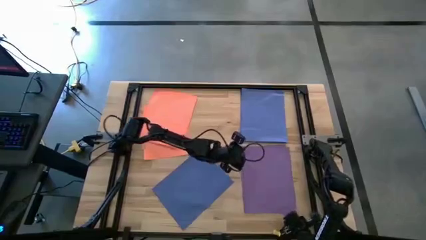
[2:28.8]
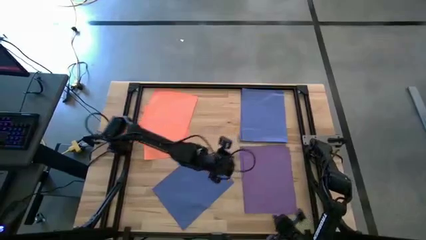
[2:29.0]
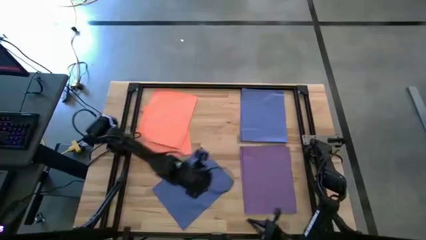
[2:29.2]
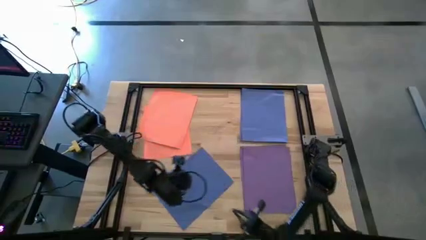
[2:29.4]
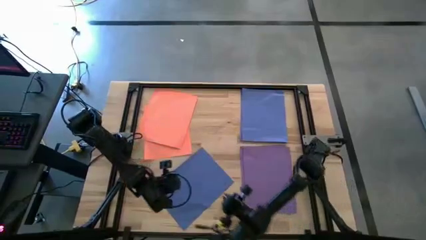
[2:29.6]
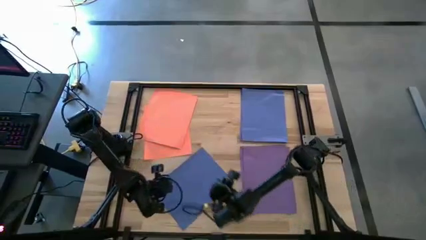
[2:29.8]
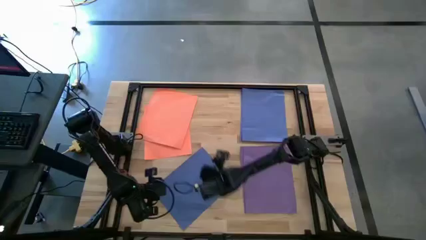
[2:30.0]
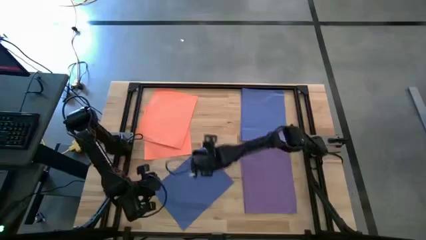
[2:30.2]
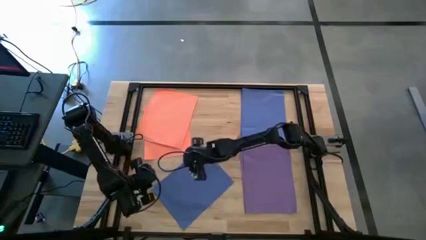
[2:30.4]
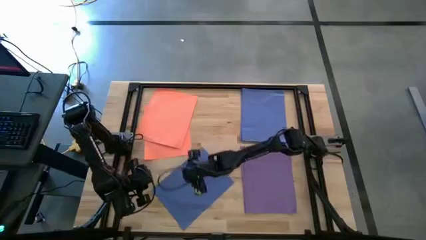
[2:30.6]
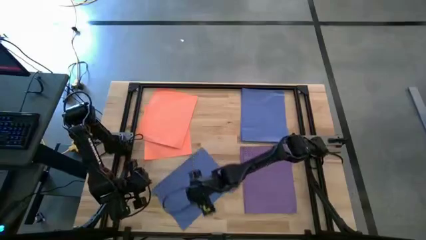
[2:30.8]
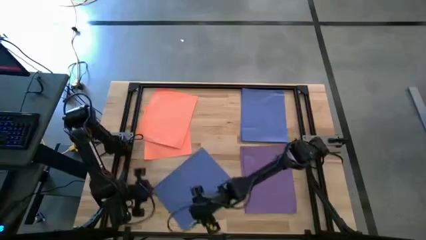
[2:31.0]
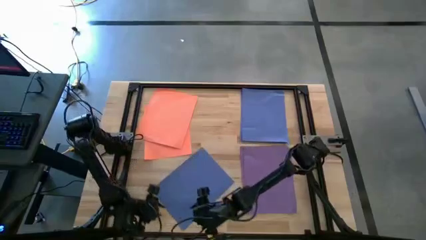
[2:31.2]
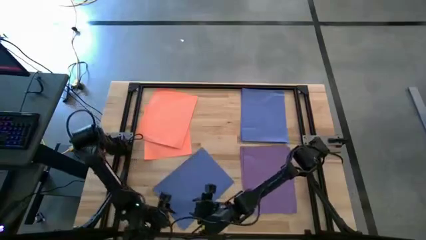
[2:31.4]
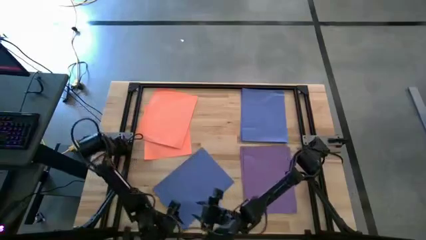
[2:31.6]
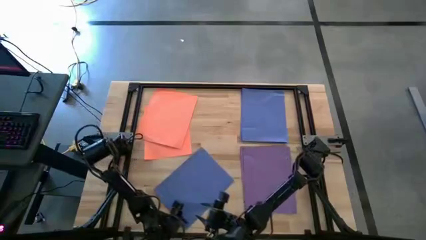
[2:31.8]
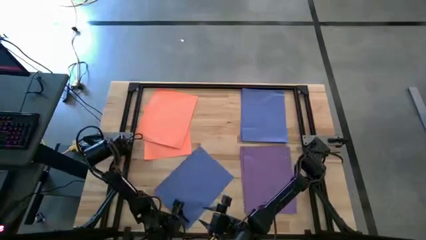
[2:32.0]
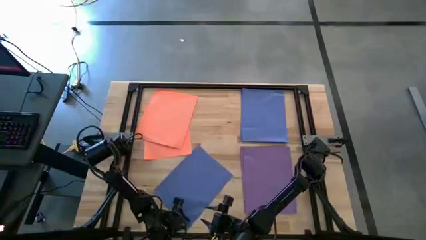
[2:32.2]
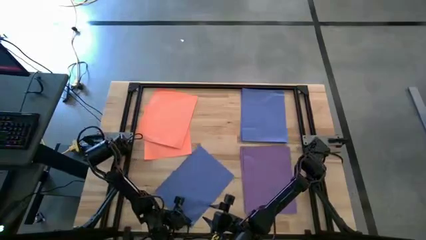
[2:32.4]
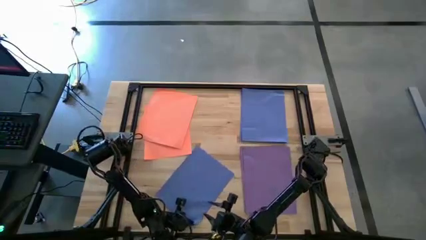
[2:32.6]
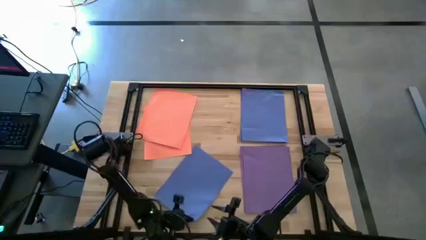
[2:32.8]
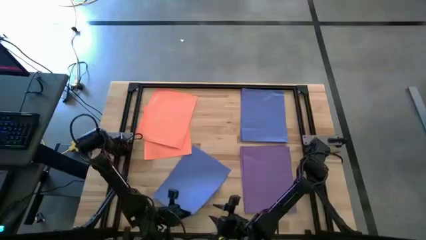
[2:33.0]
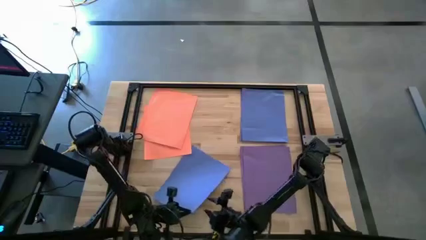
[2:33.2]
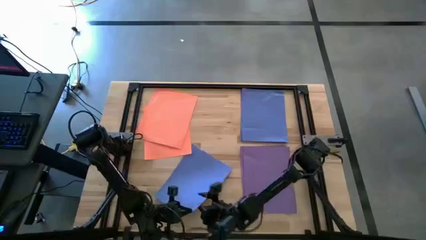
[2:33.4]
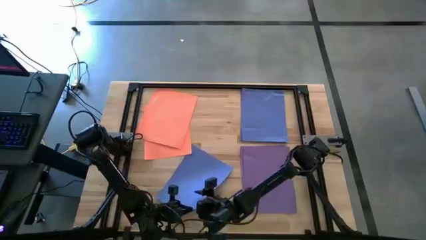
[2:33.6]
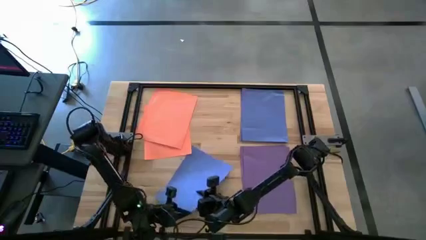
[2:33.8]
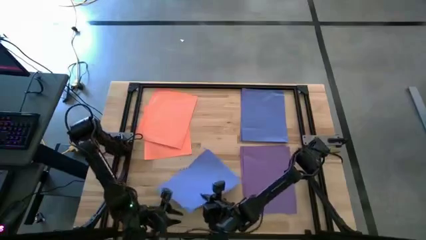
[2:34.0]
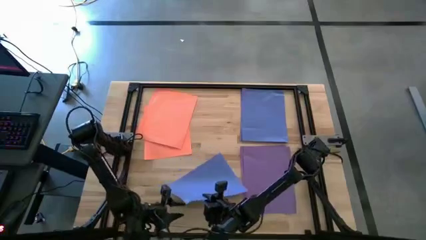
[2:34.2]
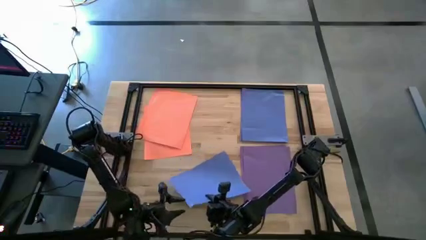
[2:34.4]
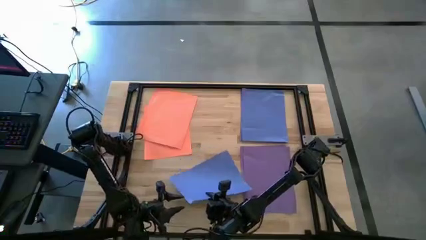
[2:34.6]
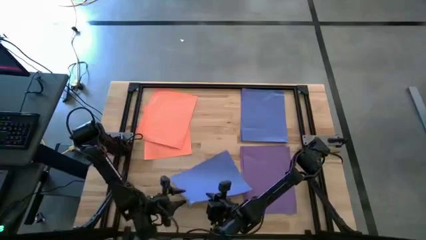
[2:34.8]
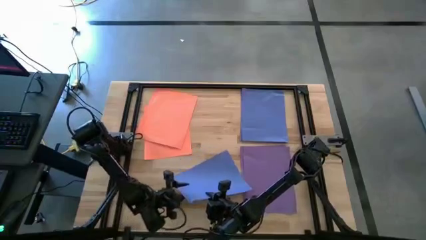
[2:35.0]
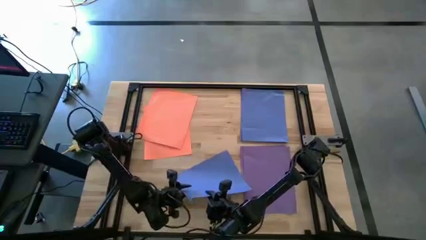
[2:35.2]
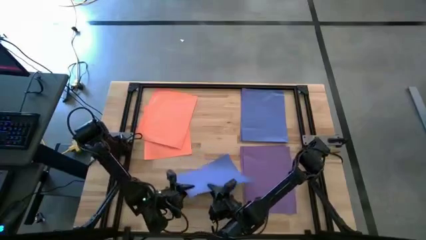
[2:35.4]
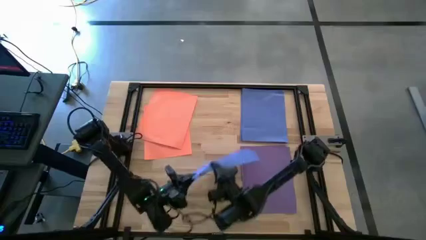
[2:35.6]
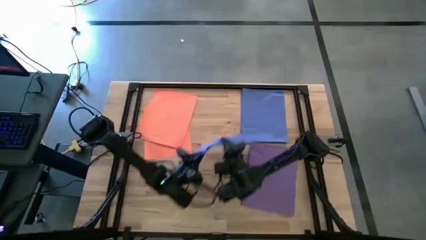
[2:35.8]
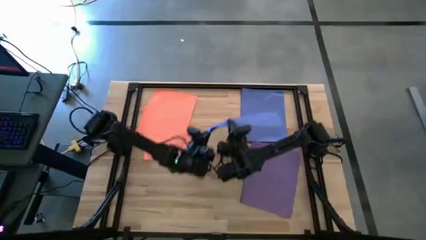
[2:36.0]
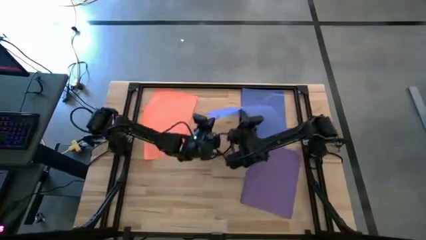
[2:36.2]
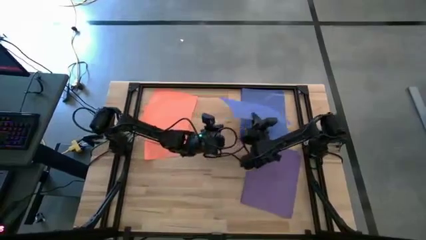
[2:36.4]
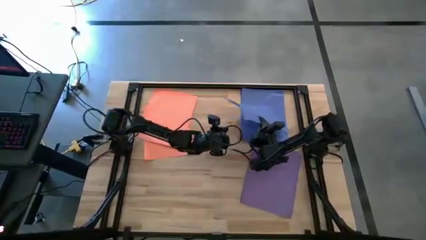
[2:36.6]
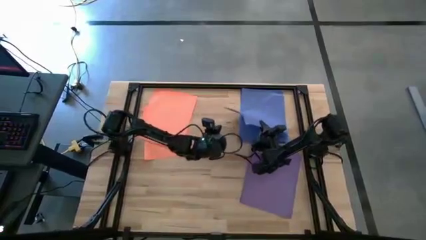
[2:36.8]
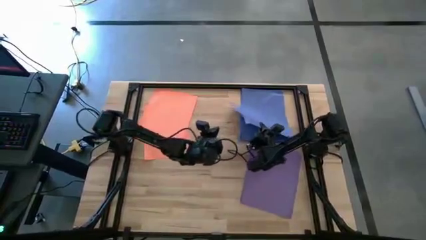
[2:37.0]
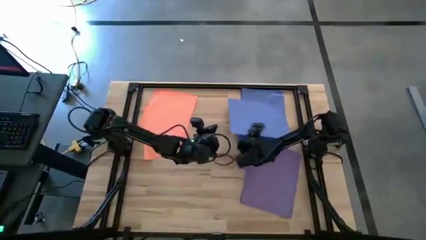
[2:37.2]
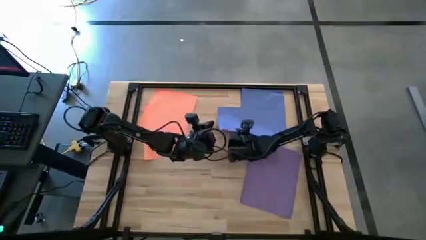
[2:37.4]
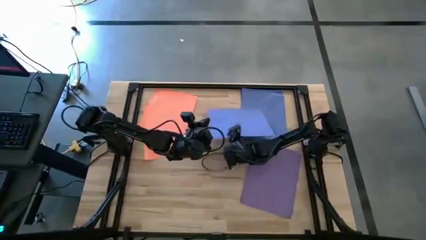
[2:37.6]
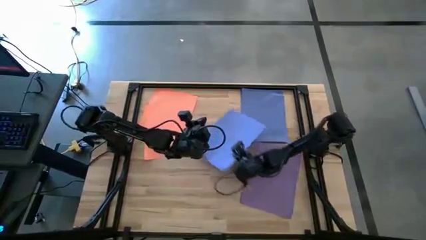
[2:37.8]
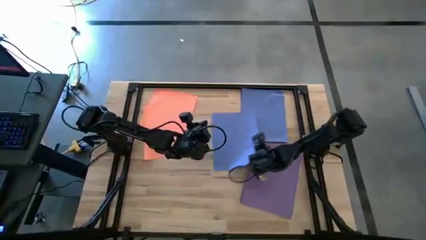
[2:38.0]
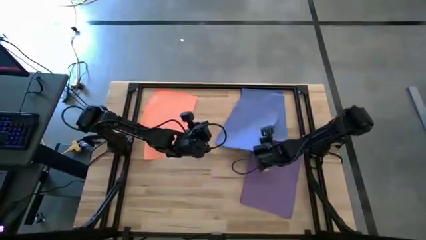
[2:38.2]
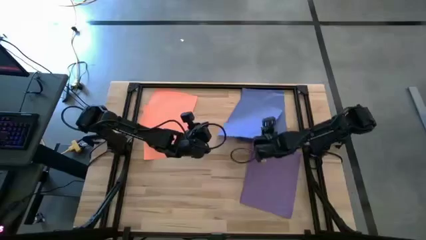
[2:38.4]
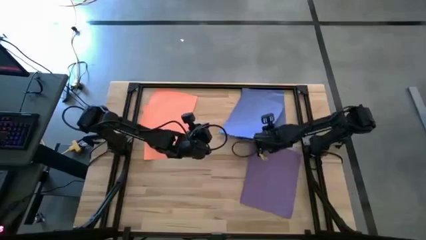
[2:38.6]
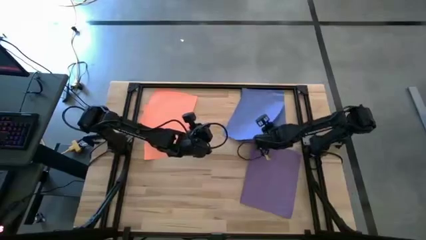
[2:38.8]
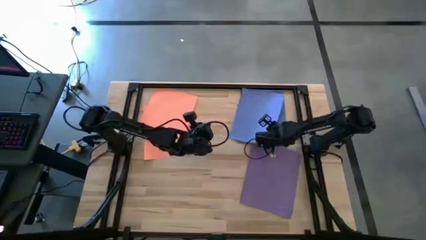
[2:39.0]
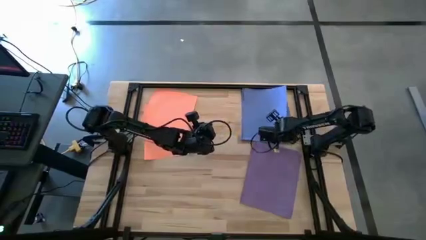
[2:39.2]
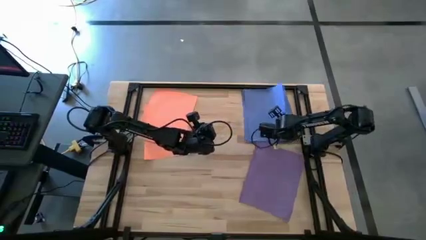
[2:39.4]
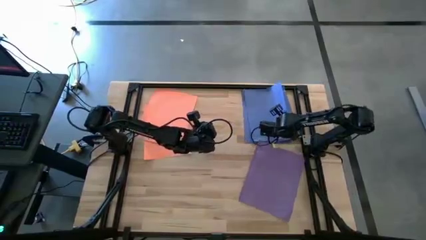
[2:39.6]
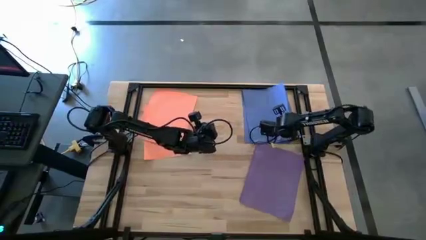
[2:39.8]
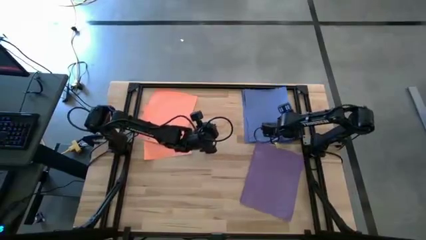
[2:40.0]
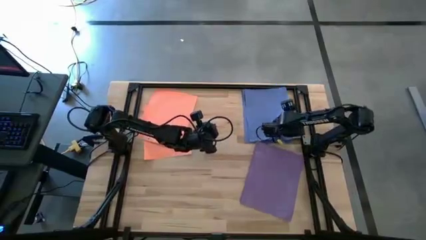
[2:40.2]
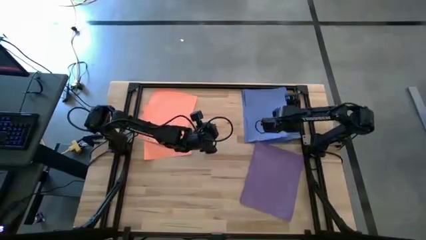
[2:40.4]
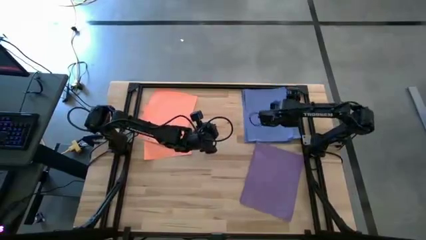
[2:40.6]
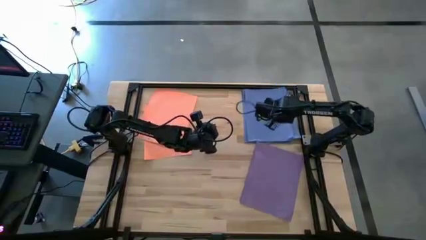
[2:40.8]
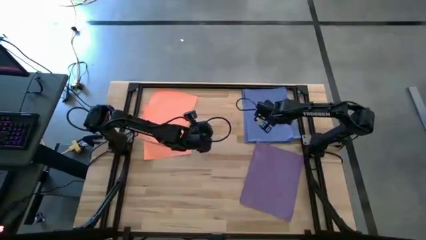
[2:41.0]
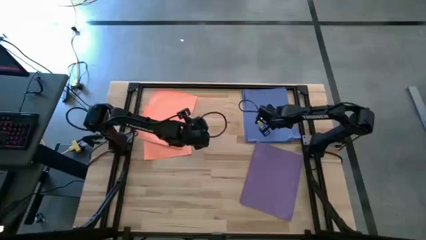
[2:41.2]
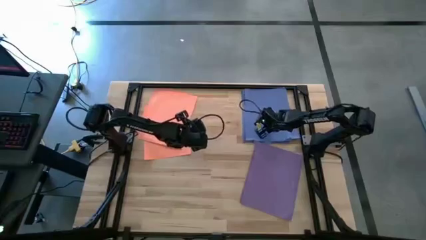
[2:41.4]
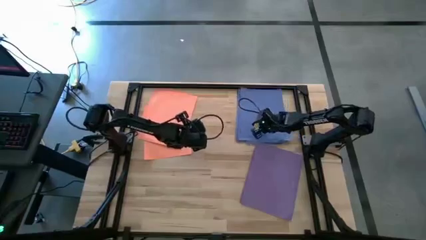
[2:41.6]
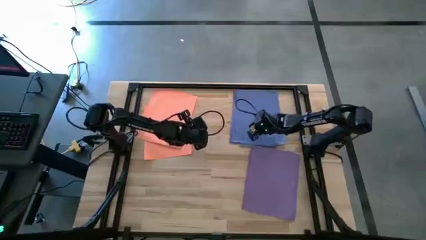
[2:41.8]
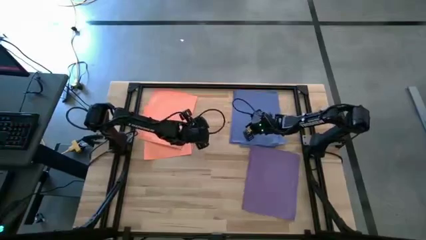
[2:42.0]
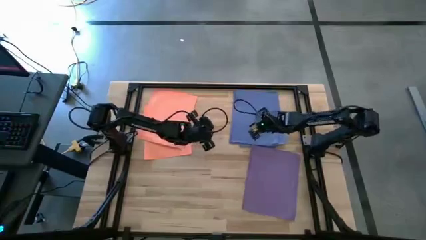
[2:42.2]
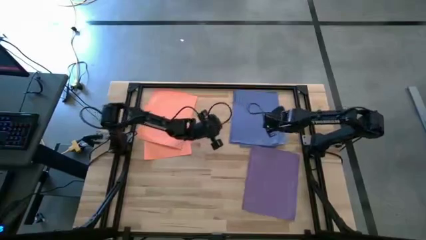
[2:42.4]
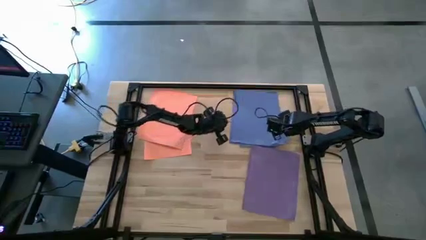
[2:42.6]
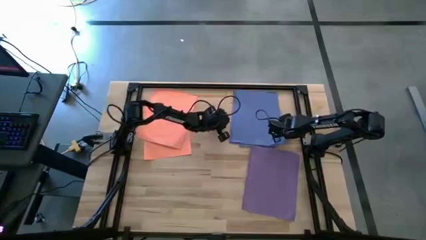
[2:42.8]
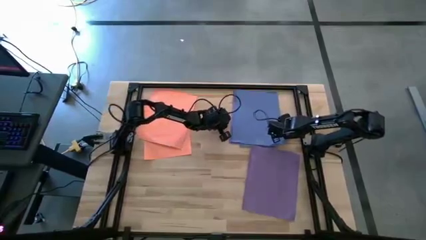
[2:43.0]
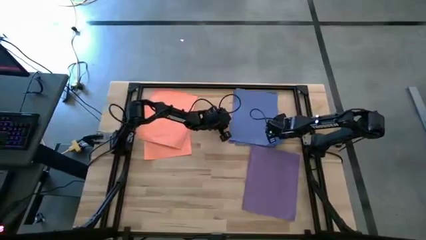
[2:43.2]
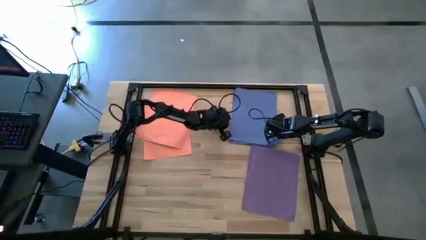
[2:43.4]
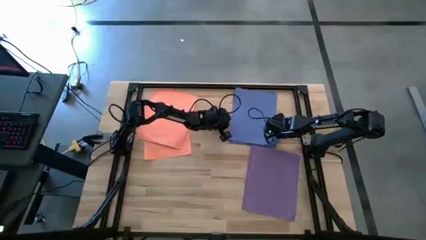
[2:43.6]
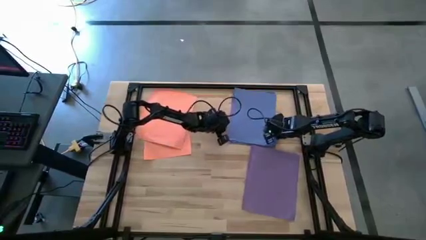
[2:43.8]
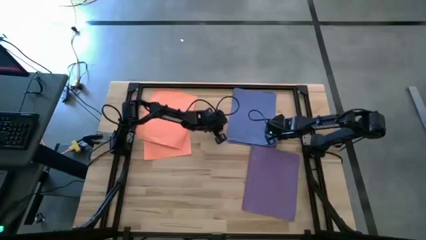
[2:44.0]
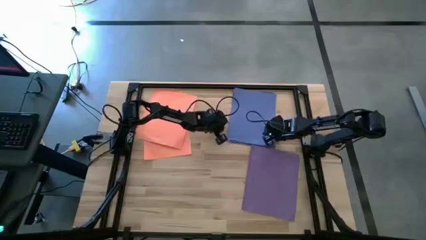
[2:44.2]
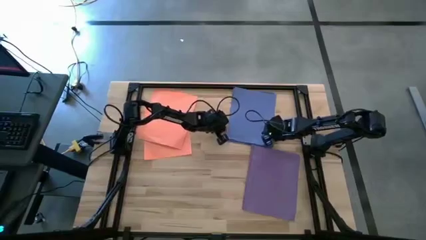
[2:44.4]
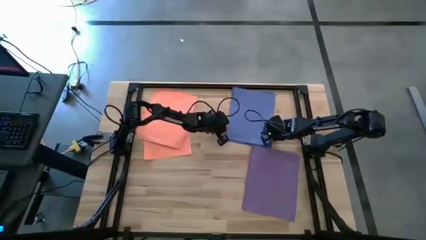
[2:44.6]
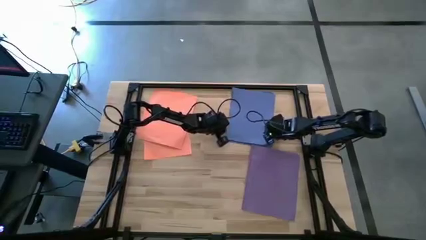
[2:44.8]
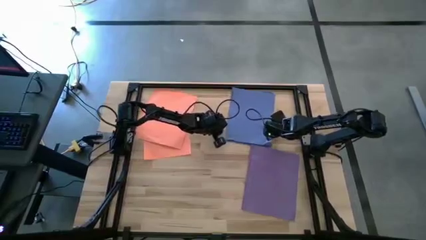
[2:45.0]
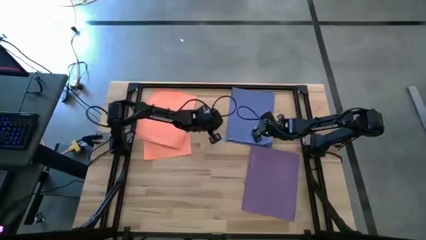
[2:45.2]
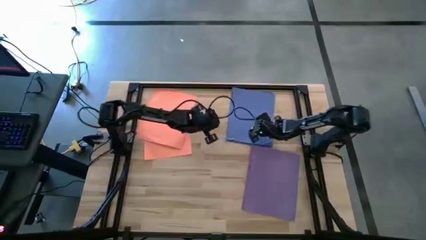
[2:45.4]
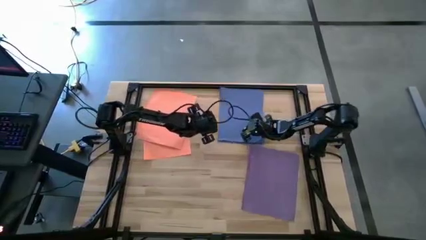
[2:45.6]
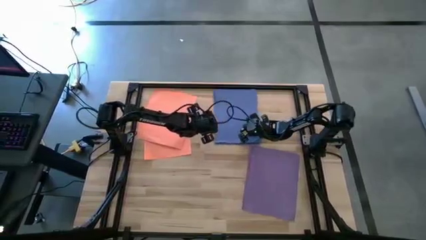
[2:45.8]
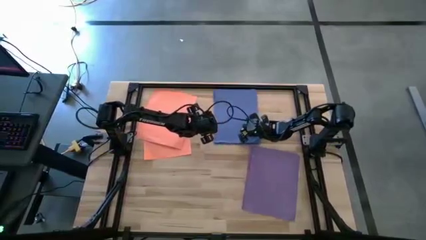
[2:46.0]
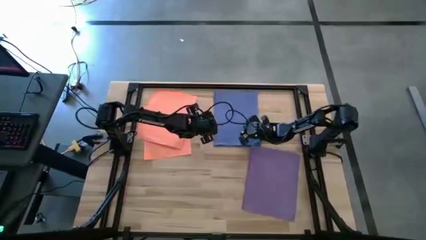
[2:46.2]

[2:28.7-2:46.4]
Task: Organize paper
Stack the blue paper on top of the blue paper
